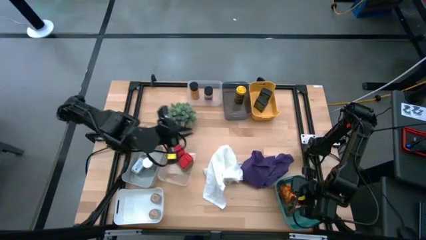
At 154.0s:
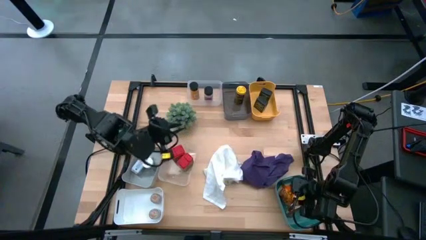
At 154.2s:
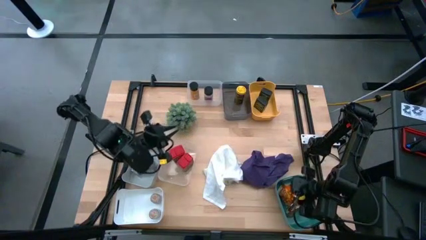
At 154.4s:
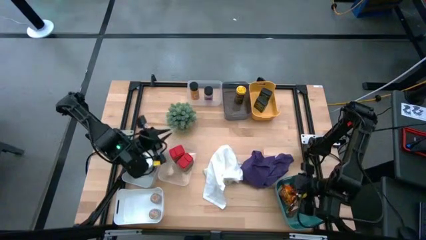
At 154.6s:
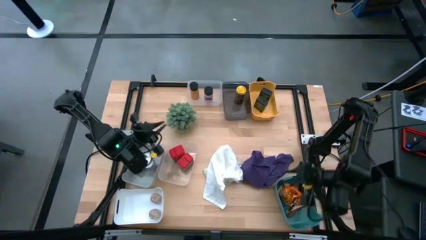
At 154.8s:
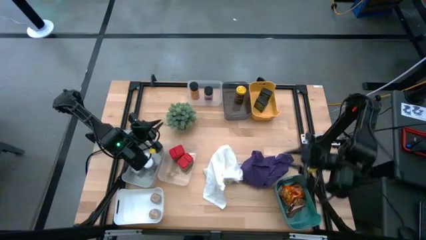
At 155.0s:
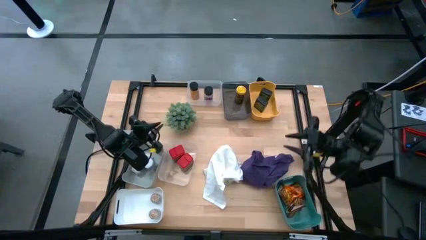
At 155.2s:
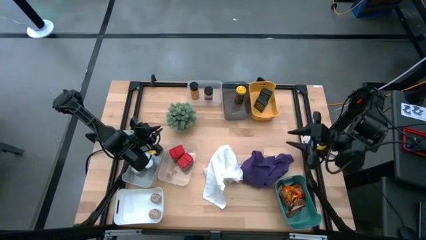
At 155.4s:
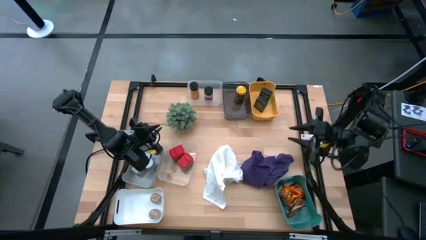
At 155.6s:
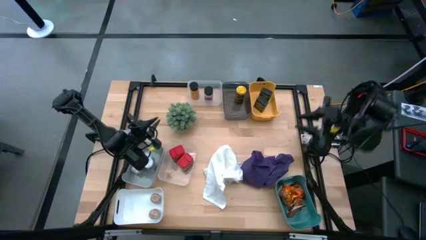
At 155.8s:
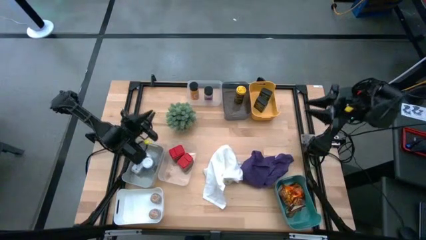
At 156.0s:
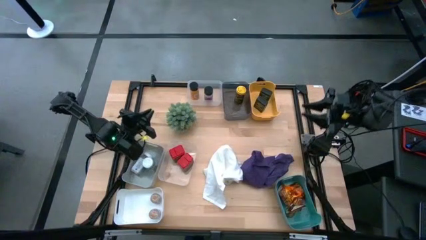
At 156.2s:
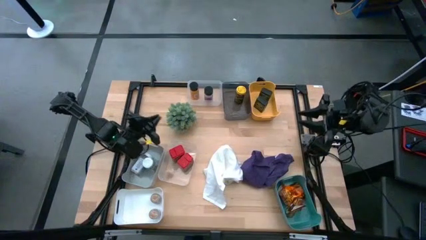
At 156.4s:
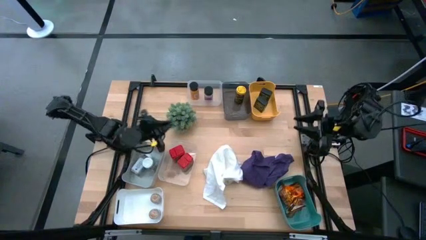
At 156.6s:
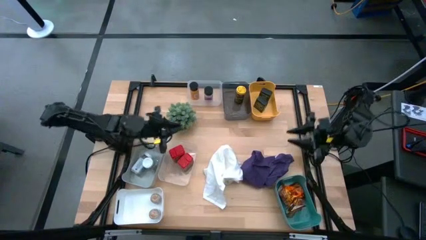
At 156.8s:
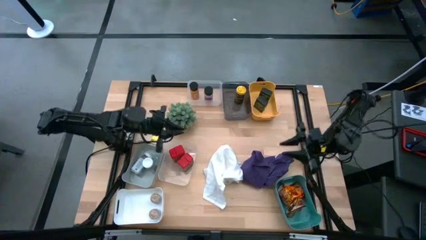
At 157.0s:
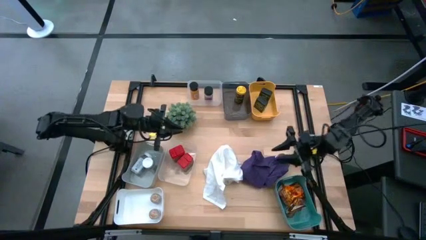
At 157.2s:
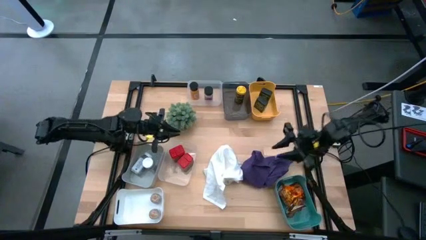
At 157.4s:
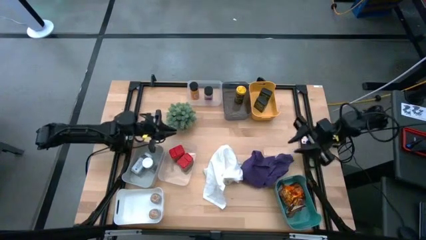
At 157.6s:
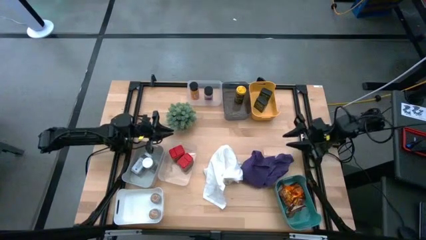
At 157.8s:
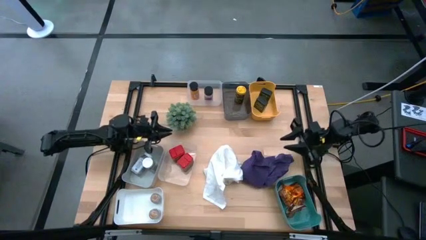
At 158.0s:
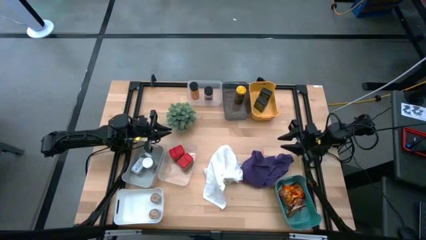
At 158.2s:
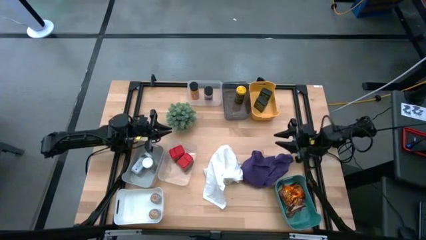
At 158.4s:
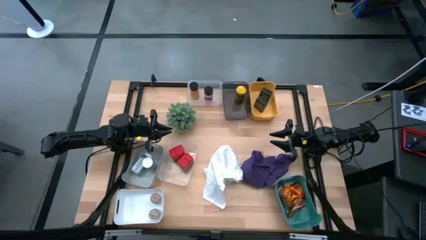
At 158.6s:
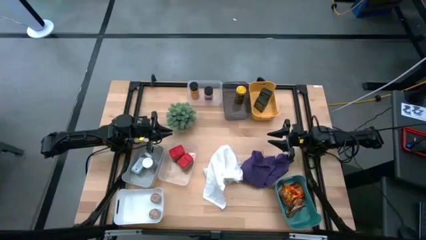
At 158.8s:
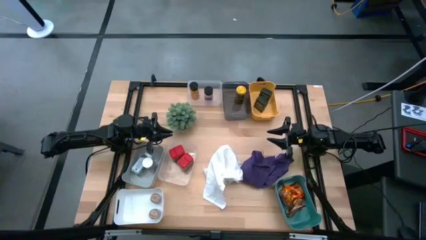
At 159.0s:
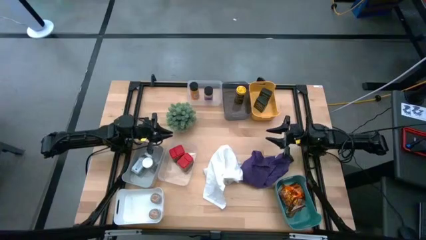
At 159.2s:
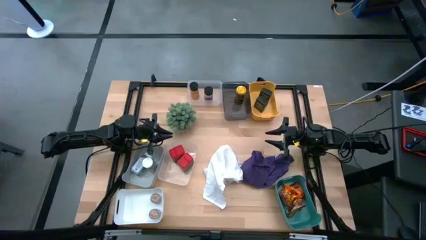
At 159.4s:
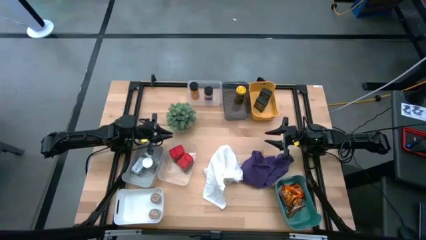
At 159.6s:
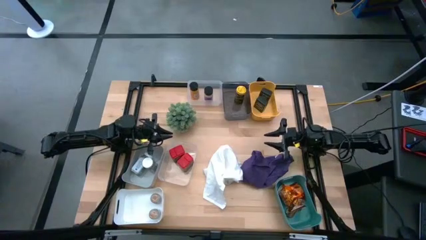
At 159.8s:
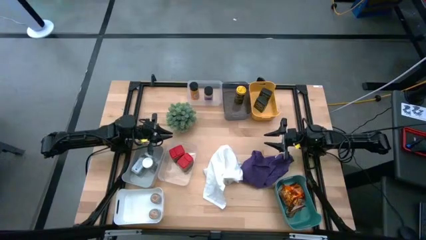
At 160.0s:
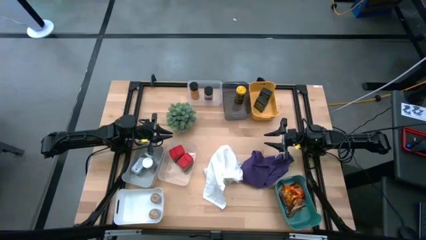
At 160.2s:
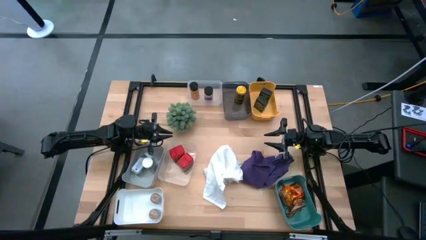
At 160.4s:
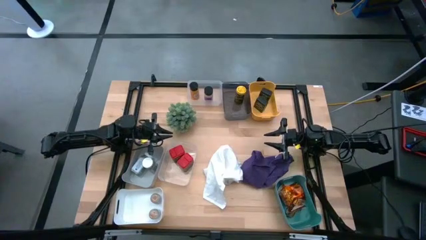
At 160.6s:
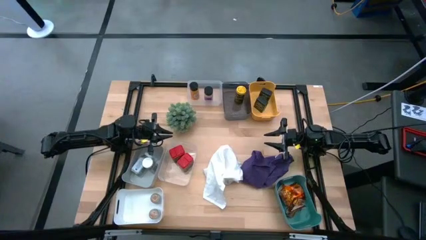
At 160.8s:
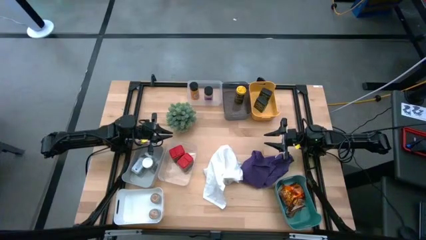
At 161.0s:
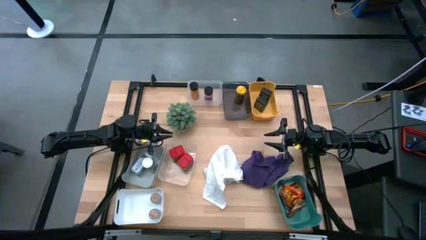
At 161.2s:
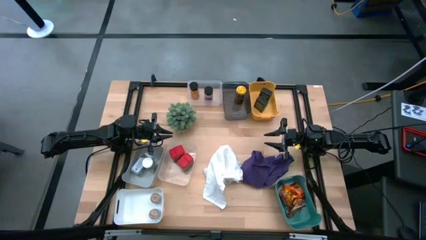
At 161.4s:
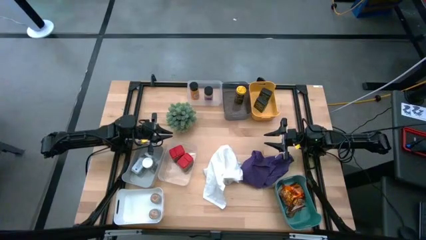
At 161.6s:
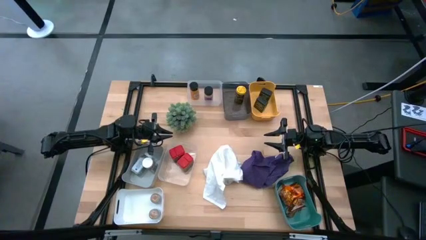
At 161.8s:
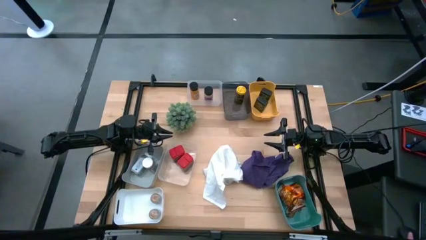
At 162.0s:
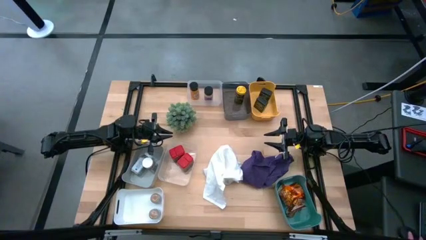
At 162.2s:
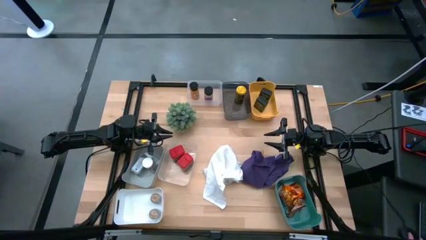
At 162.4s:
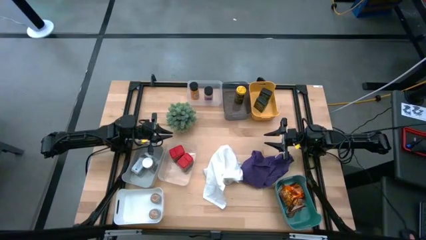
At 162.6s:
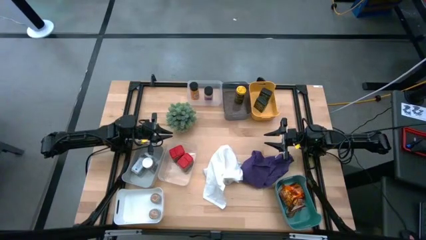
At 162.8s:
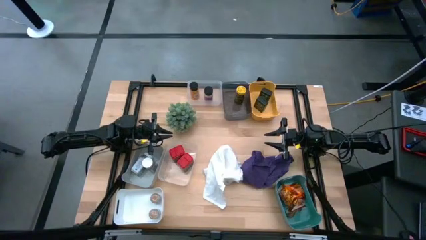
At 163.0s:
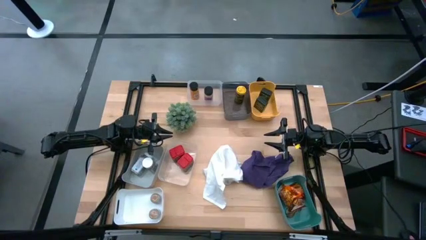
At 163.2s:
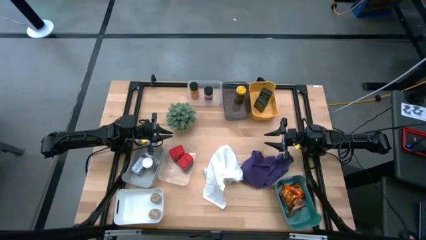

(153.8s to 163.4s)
Task: Sort spices by type
Return to Home Position

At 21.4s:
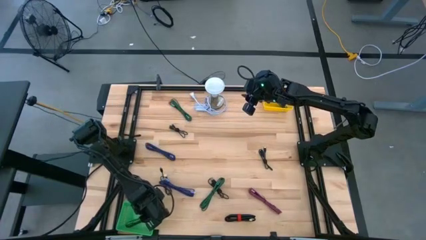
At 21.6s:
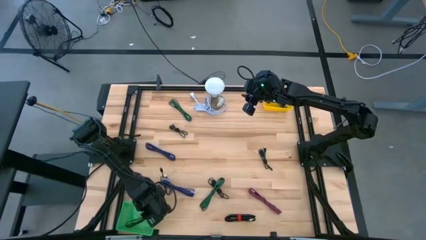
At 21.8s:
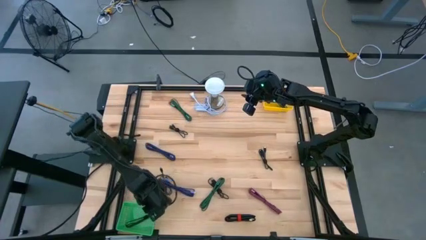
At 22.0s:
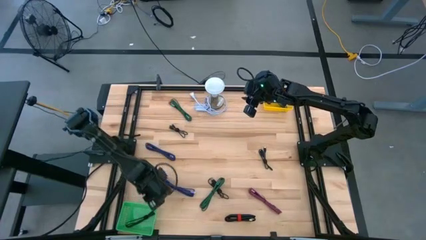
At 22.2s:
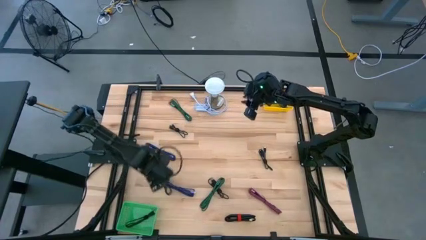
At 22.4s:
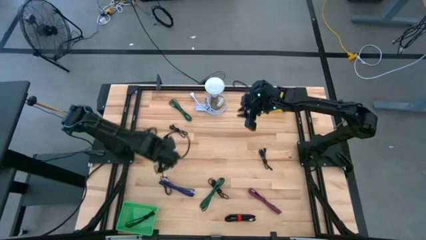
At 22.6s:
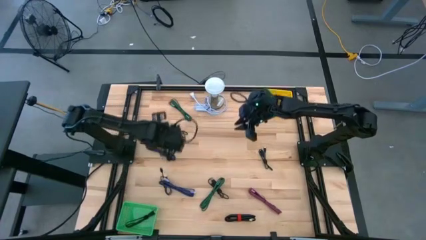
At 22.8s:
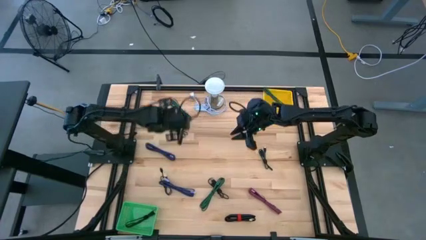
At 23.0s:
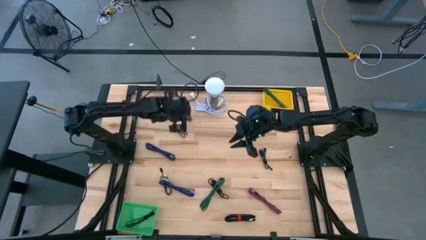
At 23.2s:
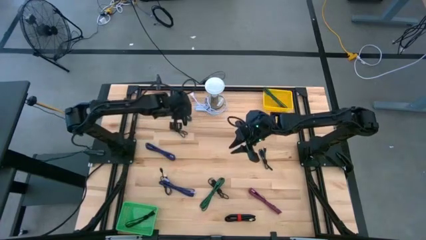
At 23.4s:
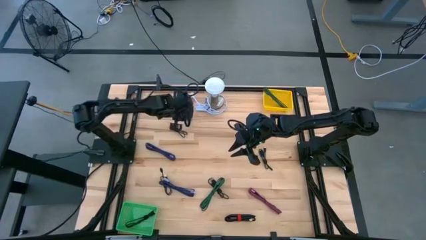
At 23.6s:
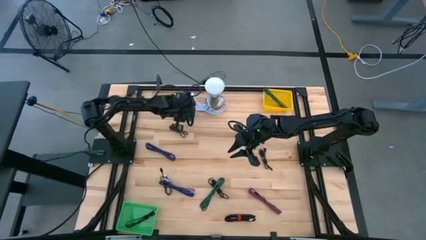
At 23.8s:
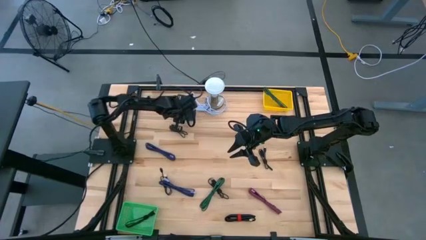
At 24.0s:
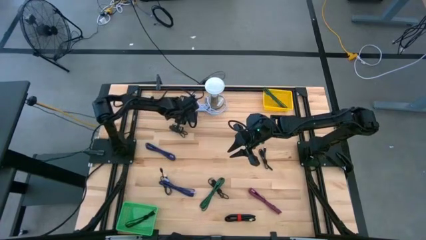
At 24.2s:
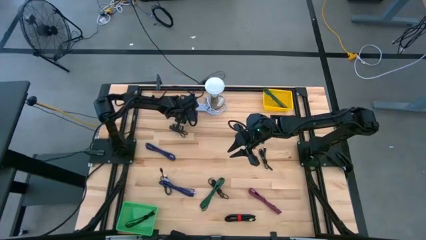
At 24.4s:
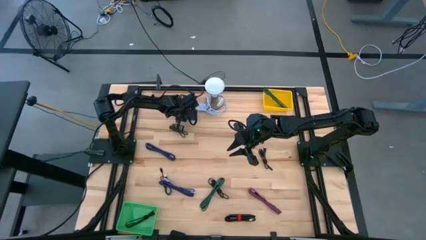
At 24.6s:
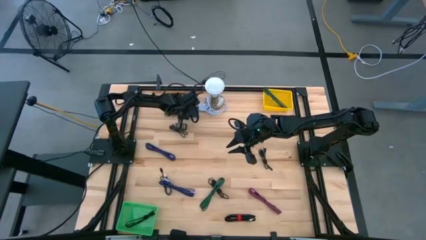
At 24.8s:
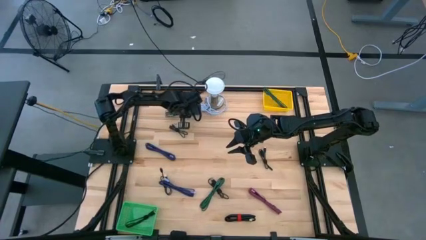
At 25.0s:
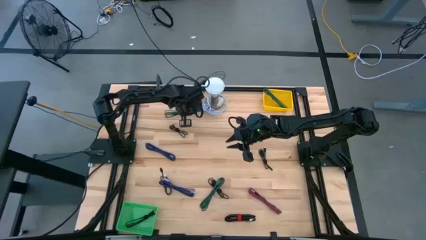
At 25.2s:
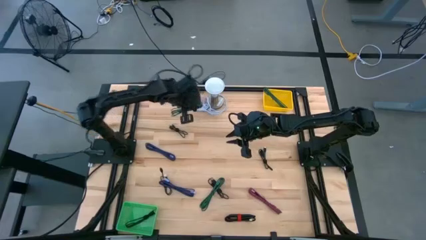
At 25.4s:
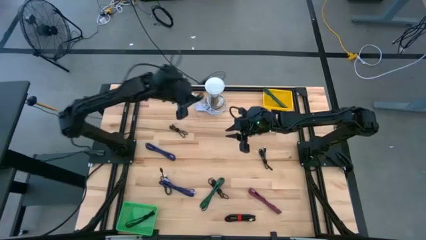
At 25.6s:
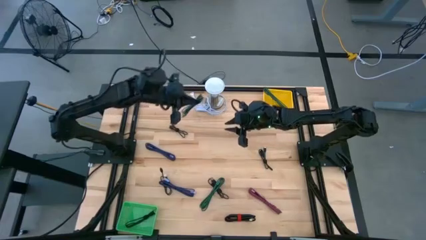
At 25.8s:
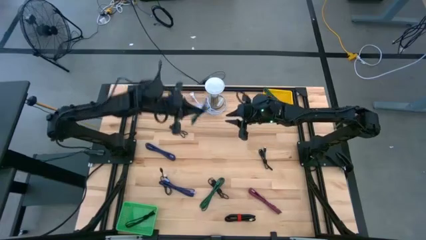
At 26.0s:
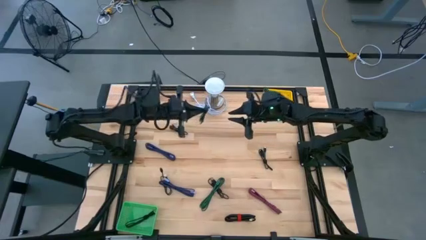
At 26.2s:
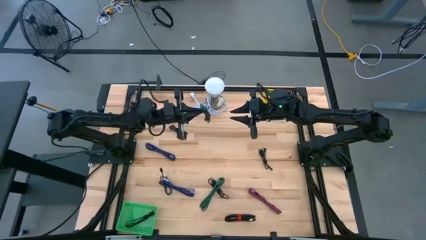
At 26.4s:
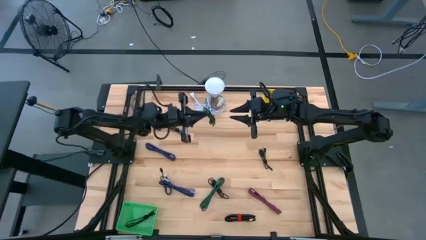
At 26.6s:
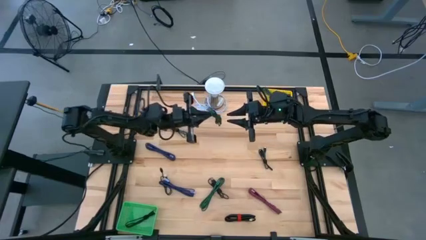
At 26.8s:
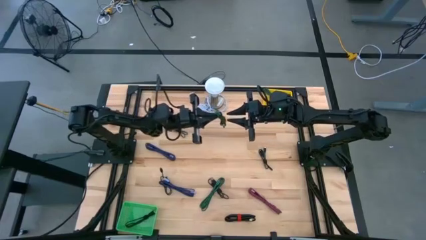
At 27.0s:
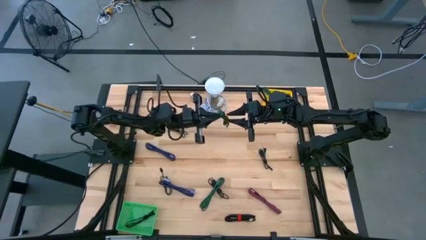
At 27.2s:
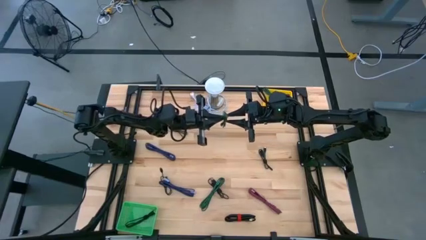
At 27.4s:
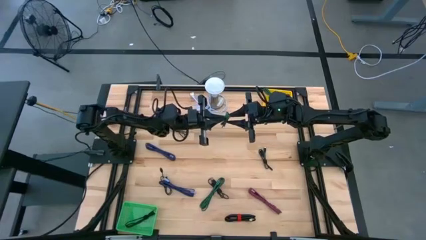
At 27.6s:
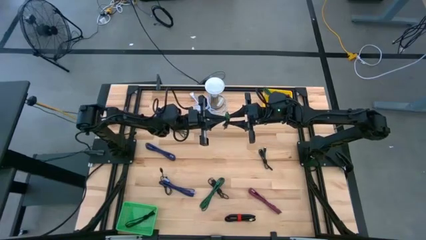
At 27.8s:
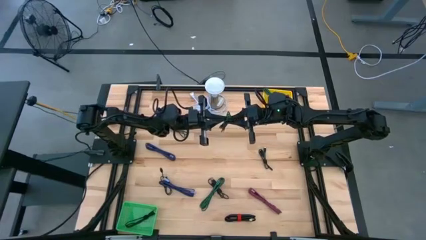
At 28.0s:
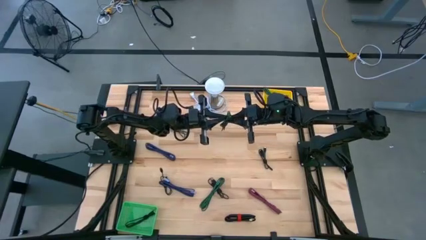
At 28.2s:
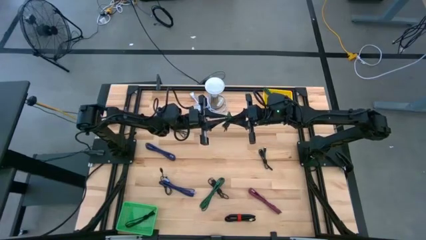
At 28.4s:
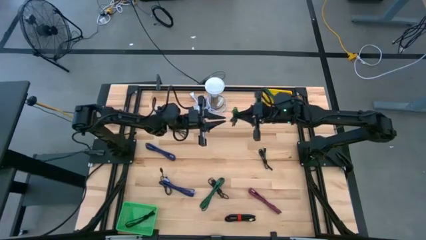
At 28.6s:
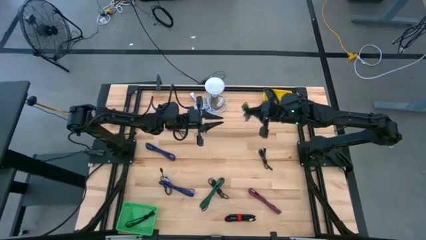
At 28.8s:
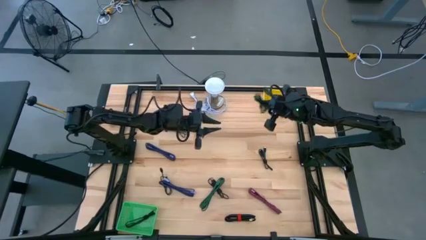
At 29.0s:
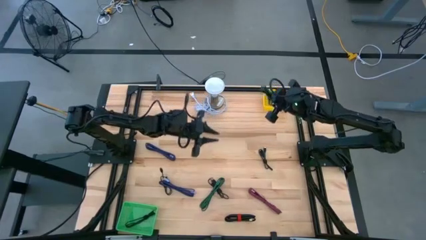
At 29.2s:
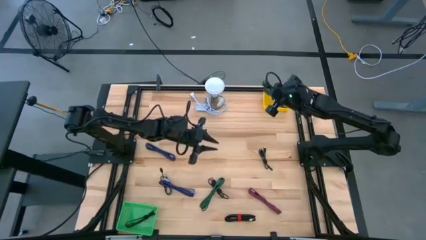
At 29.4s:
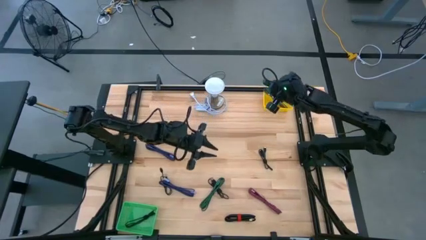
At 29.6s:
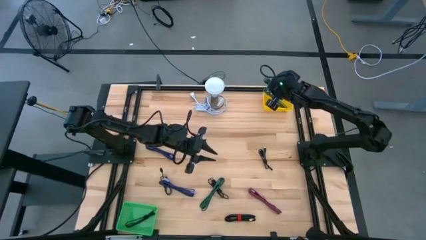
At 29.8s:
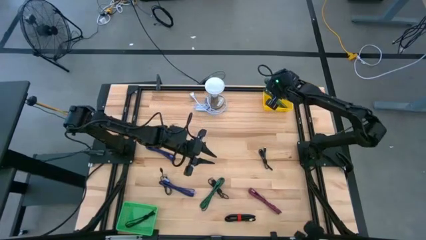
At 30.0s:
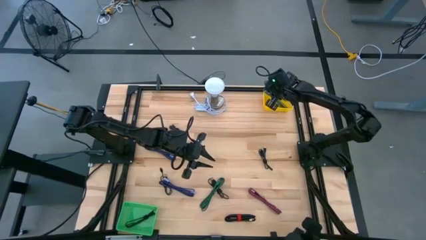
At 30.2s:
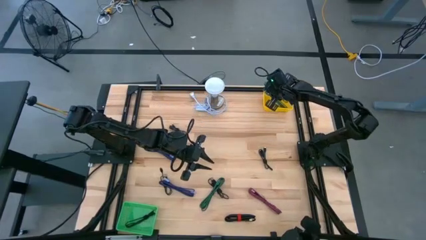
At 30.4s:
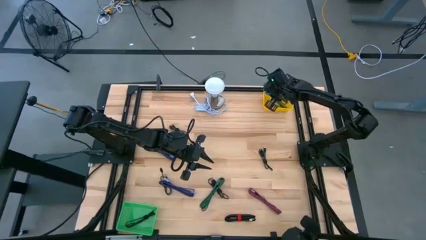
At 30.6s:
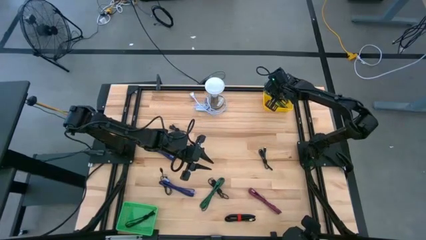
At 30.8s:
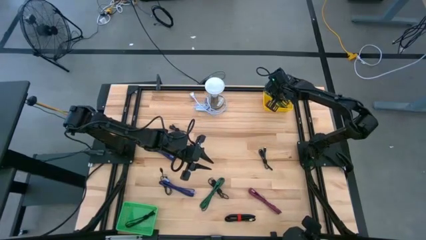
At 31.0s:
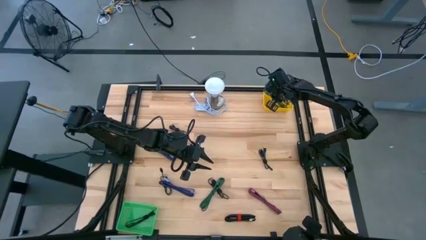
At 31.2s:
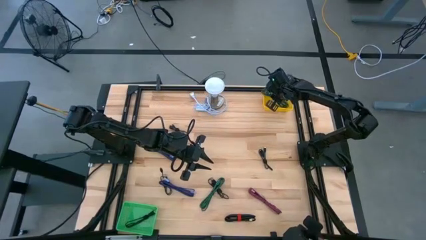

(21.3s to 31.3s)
Task: Pick & Place USB Port
Put the green USB cable into the yellow bin
